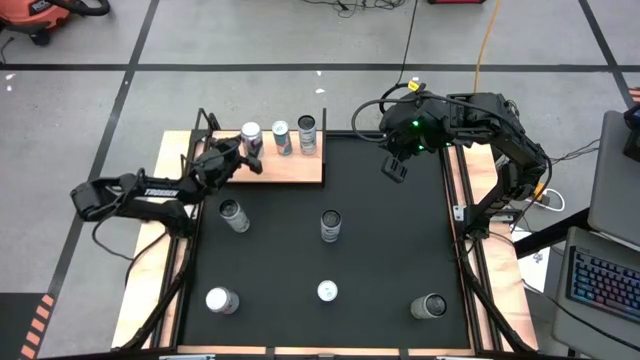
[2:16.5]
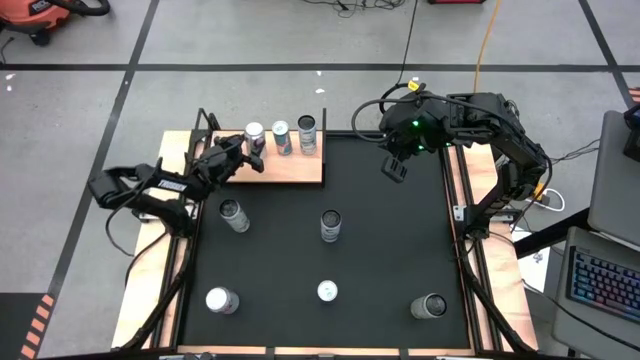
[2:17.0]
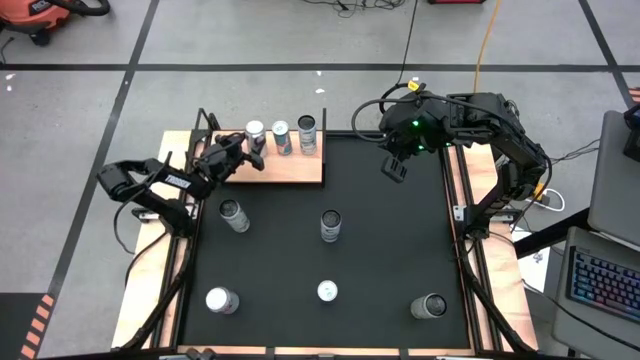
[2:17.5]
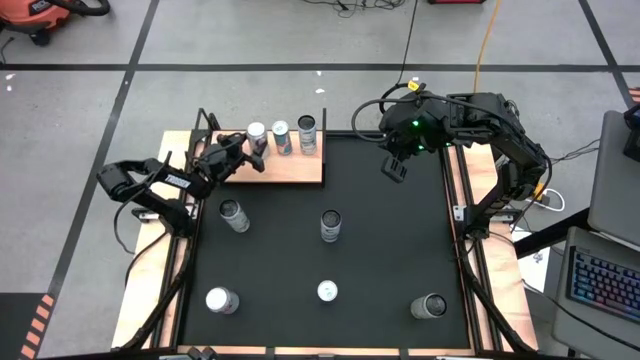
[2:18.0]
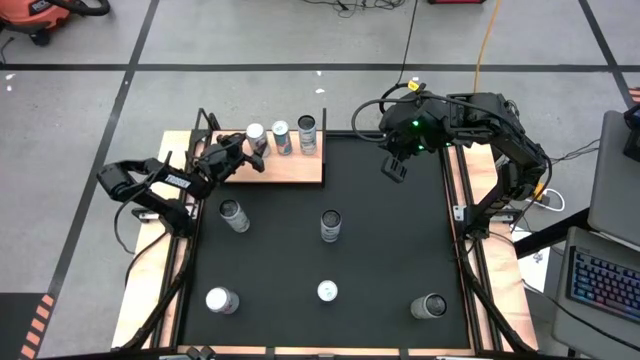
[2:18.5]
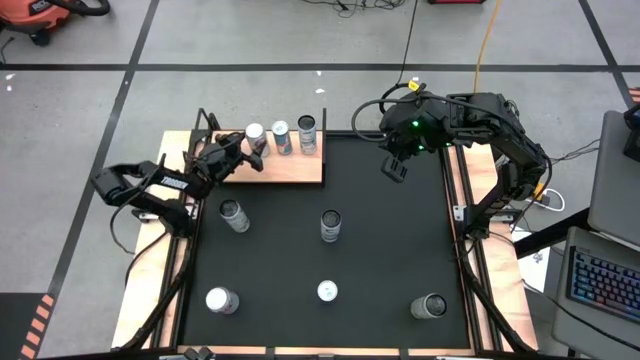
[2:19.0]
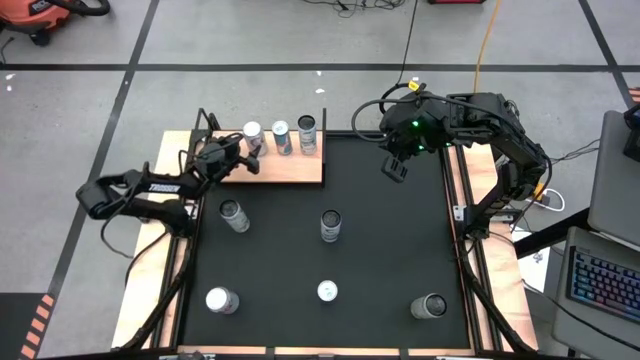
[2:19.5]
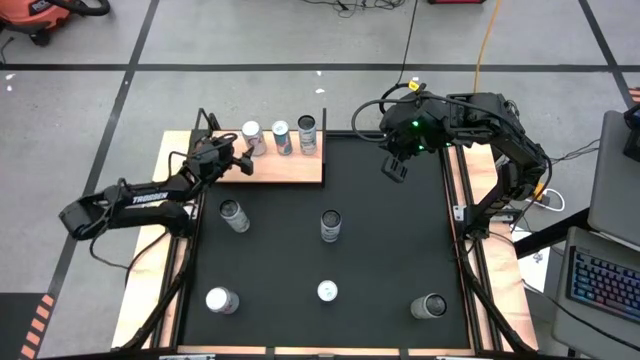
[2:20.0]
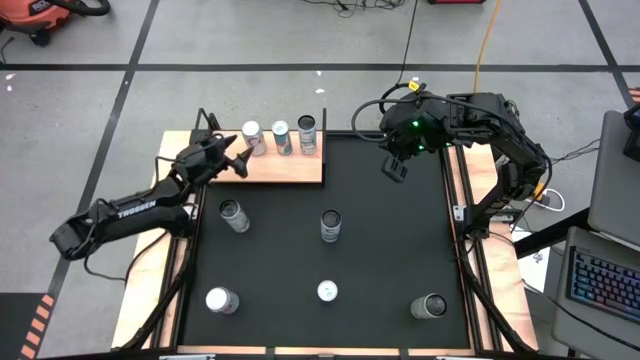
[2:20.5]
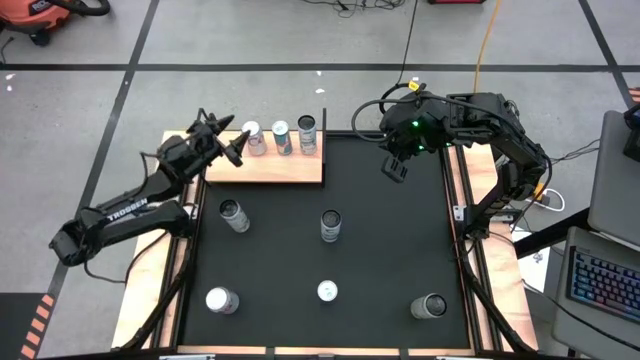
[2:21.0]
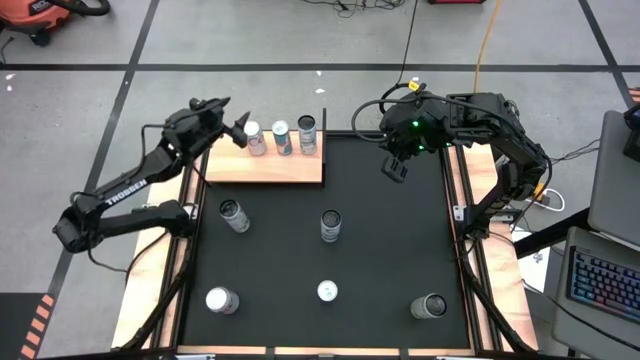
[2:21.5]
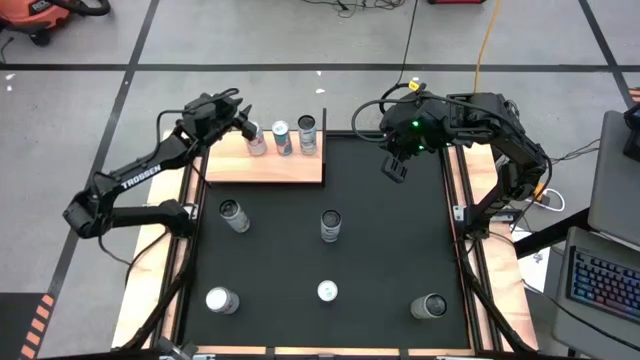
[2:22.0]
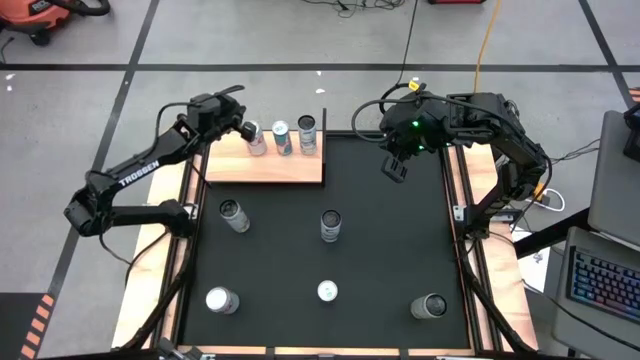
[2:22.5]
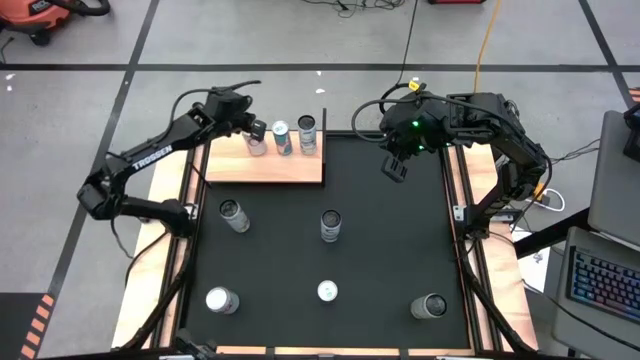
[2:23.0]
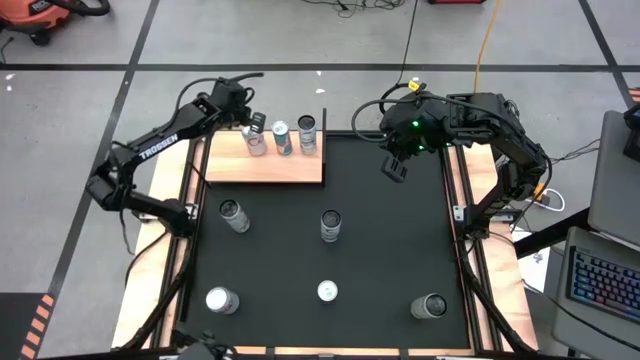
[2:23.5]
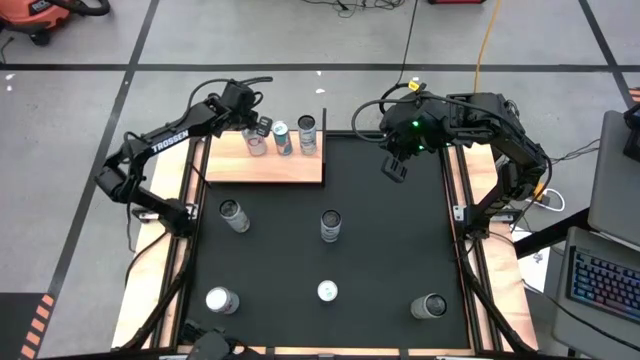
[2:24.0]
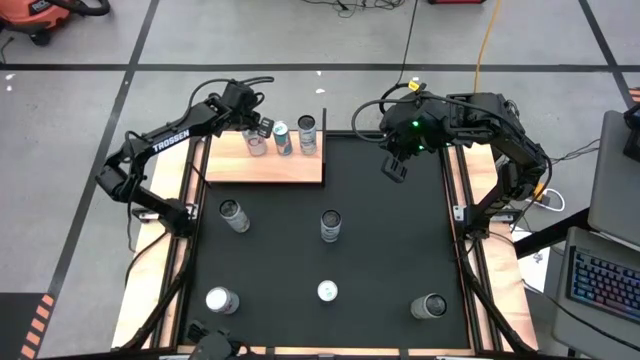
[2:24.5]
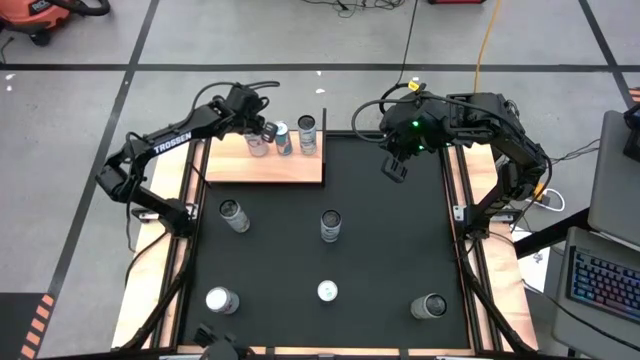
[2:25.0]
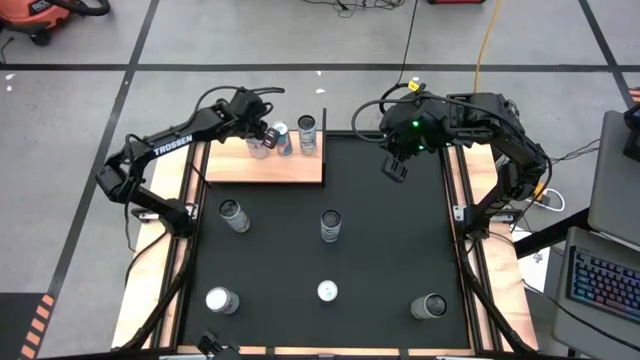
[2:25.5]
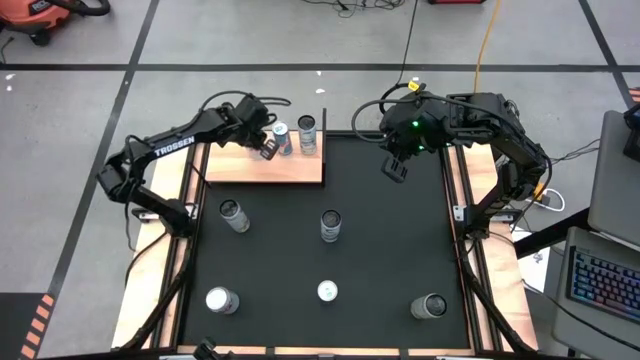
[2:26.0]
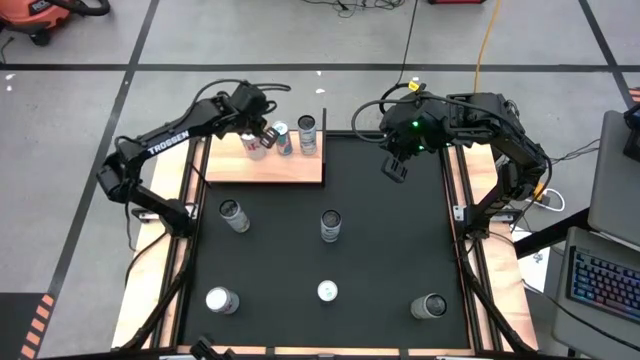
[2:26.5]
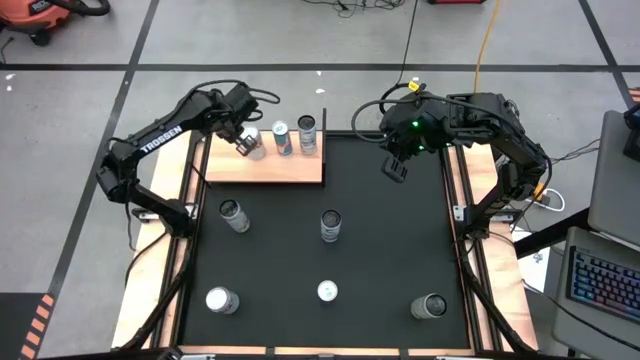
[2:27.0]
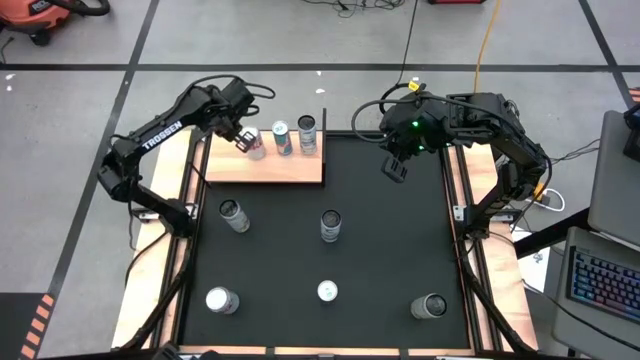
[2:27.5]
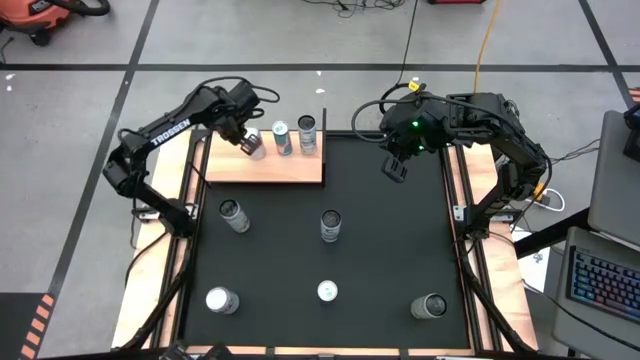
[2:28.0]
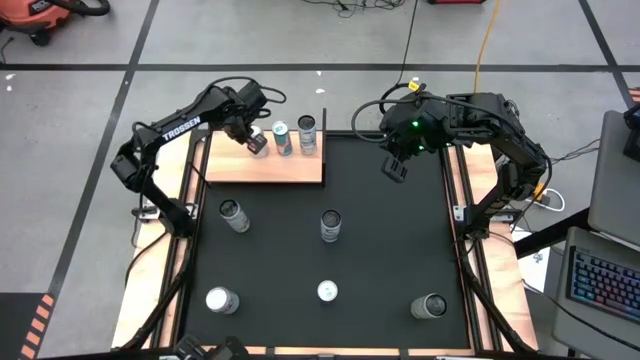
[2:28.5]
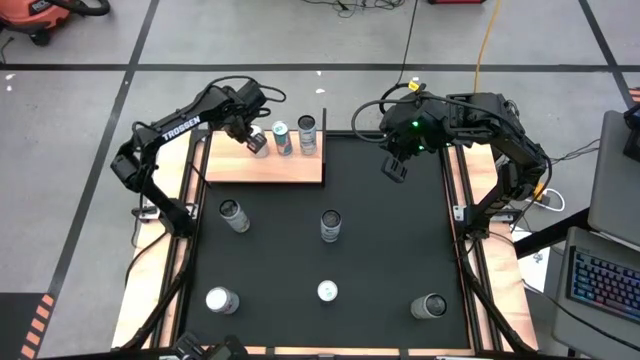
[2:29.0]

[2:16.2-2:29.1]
Task: Place canned beverage on shelf
Put the top red-silver soda can on the shelf

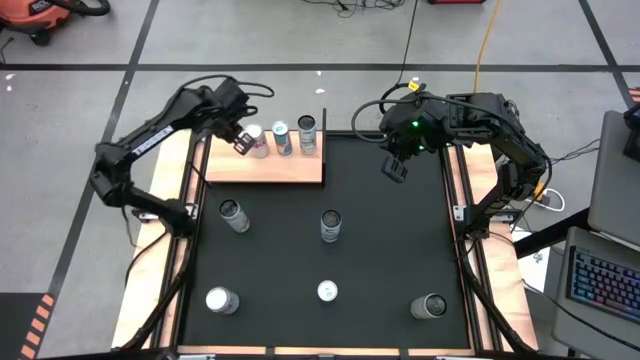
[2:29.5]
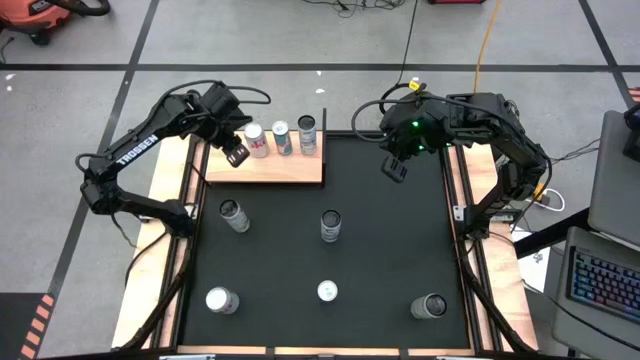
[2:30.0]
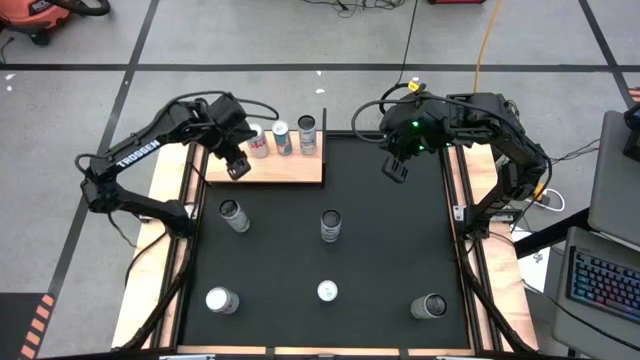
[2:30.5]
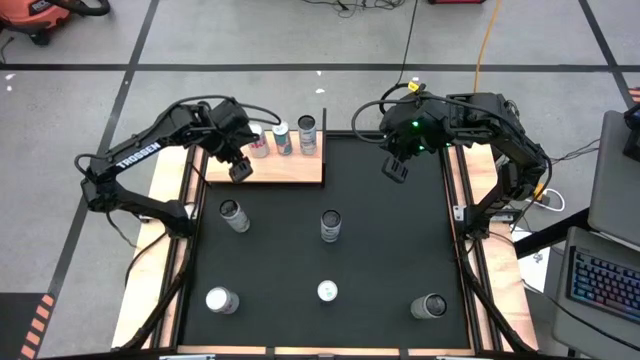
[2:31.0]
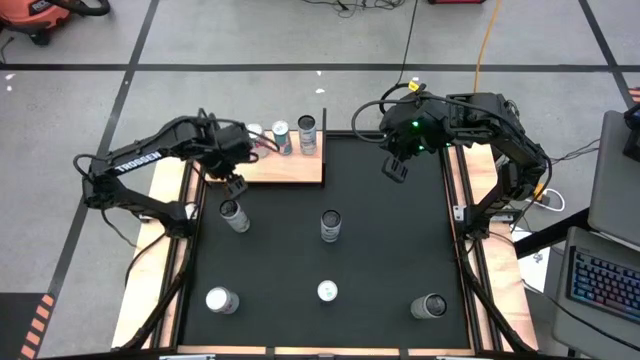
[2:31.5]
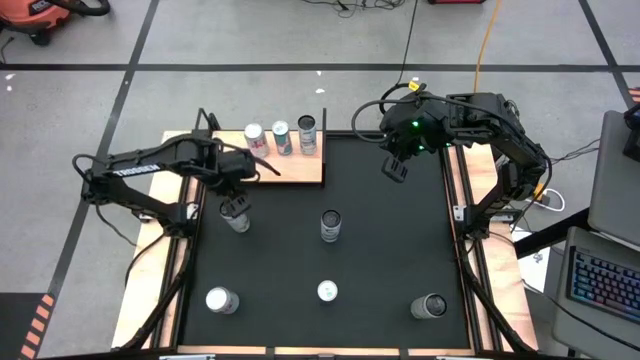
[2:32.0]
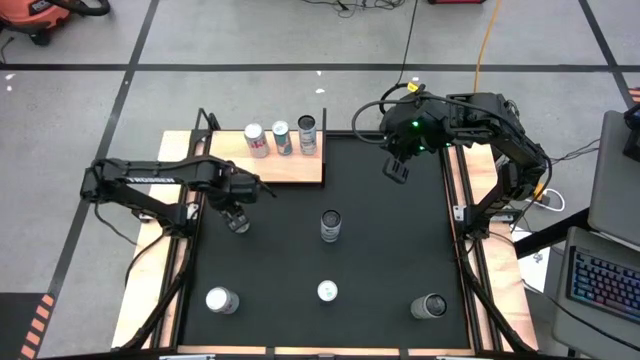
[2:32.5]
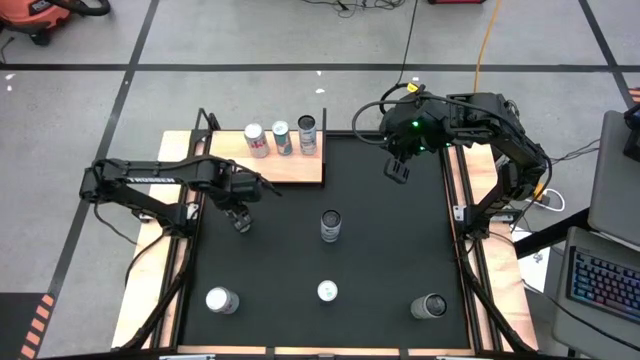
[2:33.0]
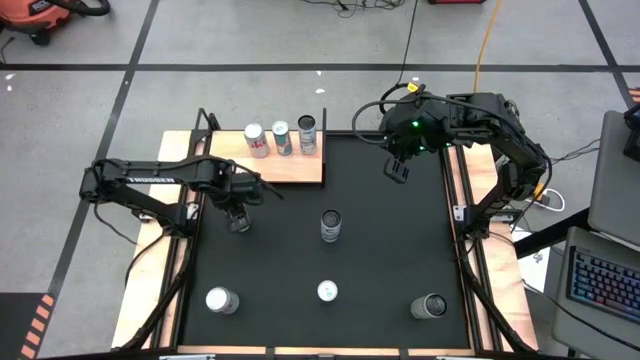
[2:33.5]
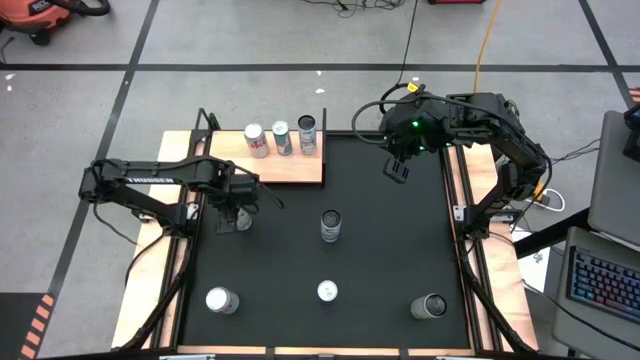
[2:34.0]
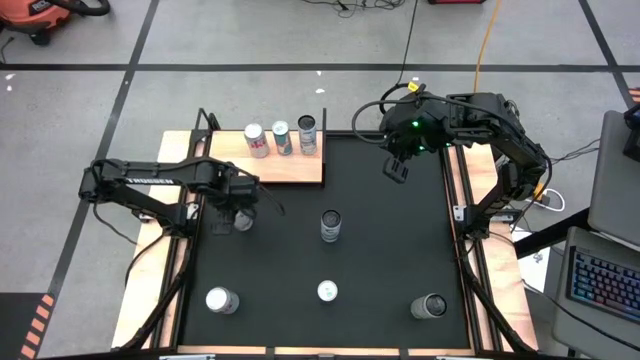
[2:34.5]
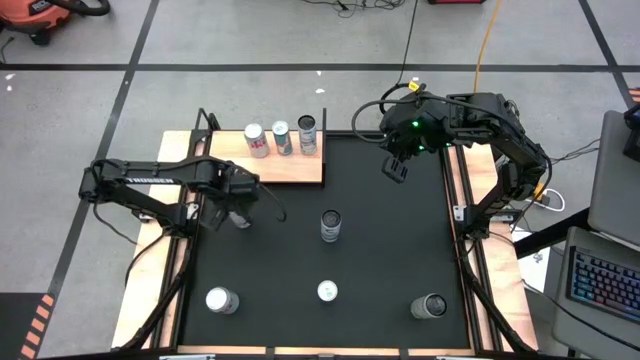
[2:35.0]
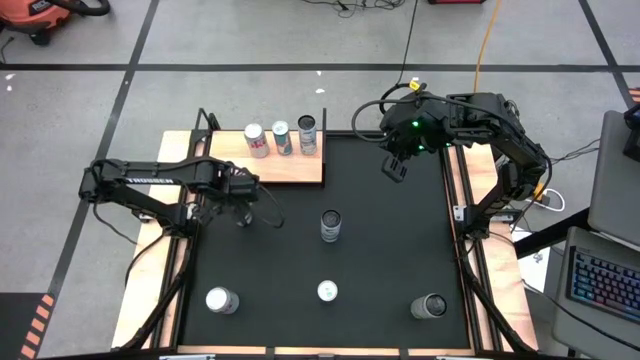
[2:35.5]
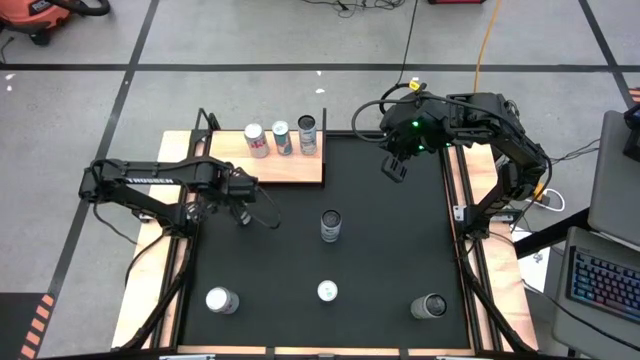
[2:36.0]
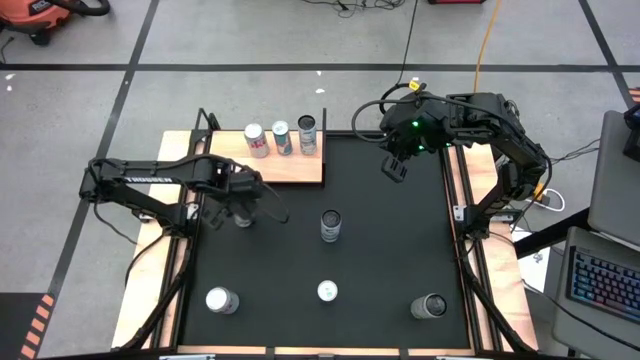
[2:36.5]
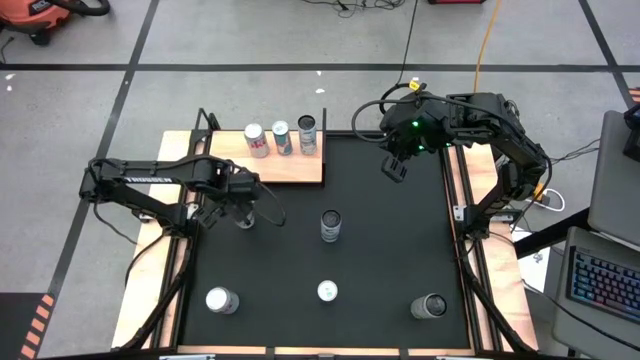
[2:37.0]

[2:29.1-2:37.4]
Put the top white-yellow soda can on the shelf

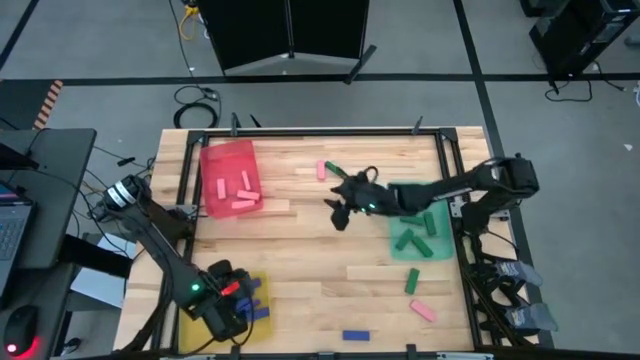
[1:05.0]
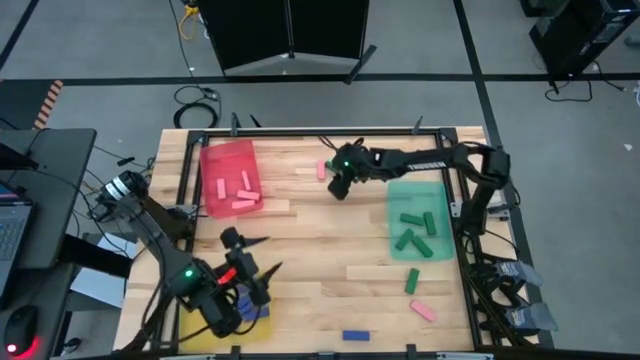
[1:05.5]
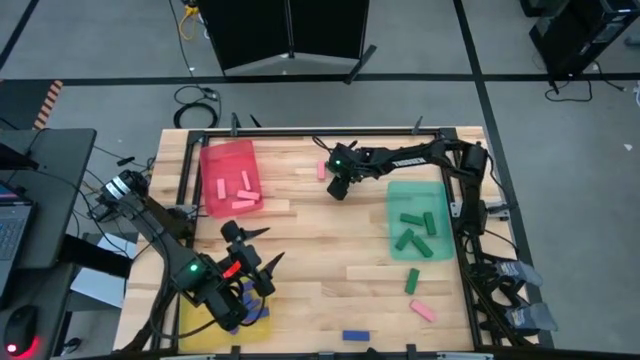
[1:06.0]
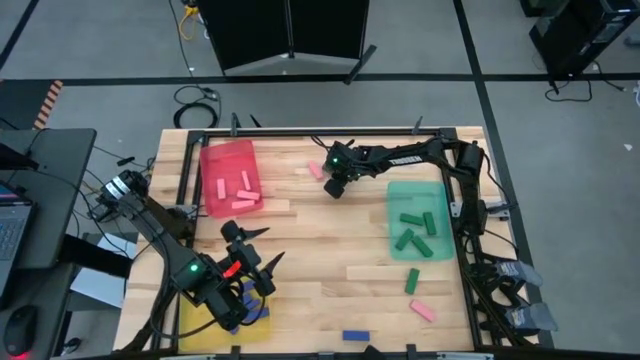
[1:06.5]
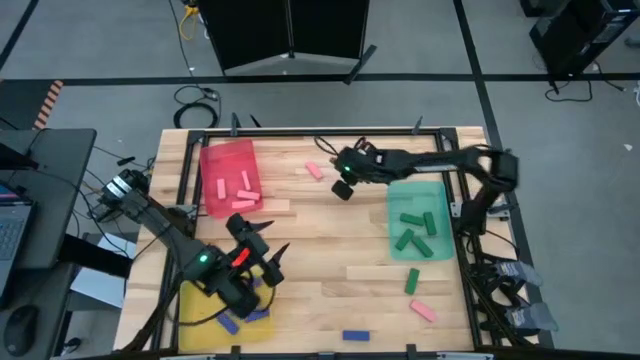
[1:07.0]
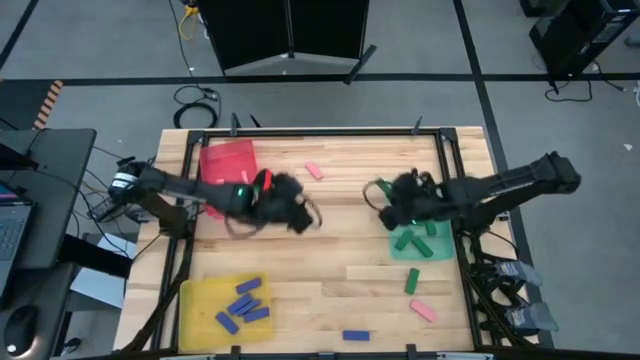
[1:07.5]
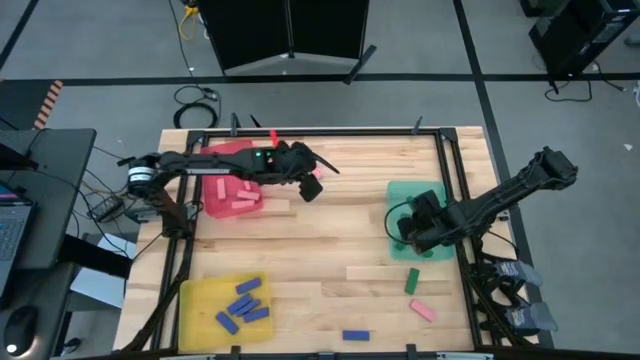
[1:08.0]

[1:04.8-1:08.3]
Task: Sort blocks
Put the green block into the blue bin
